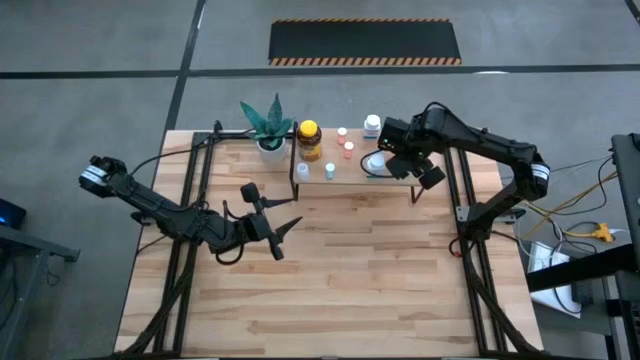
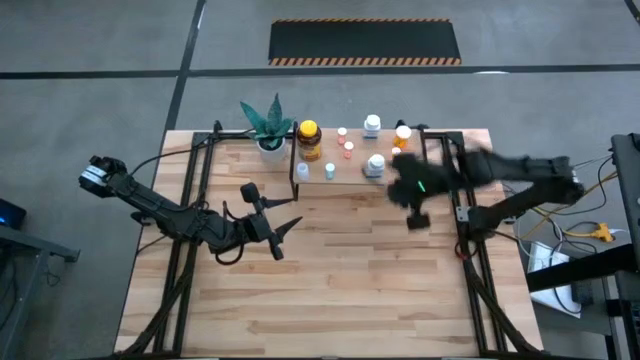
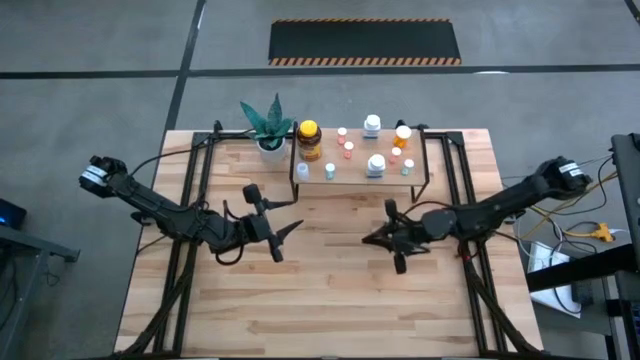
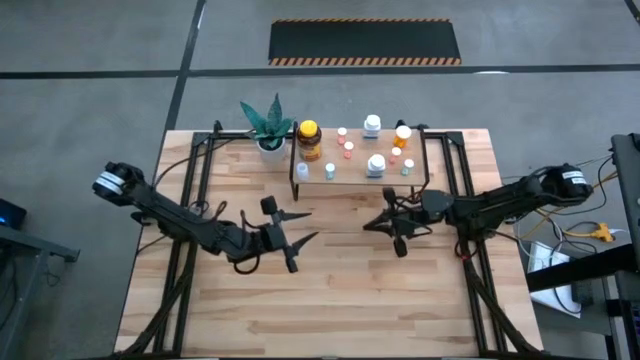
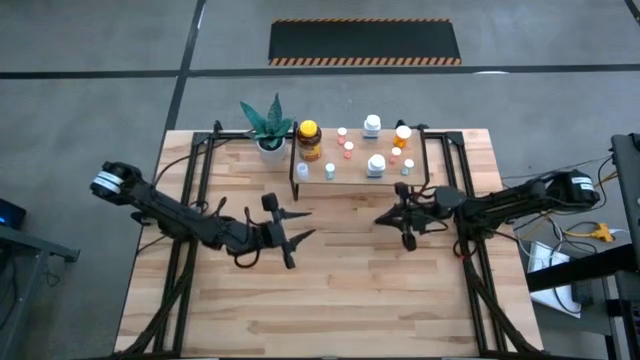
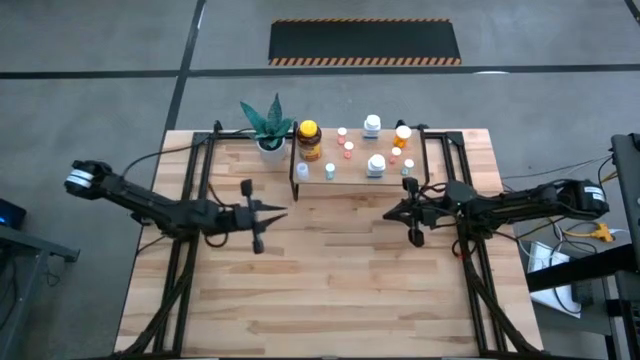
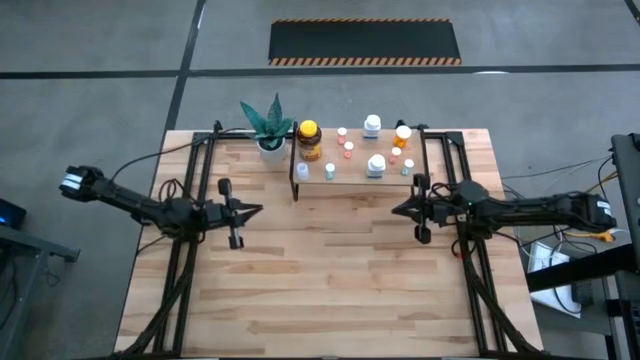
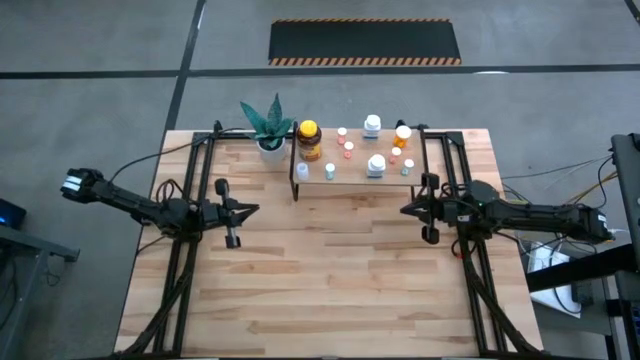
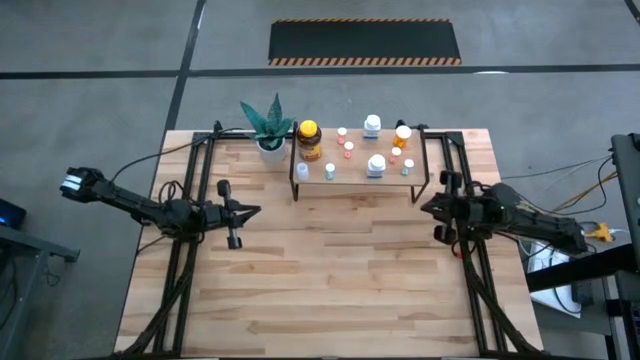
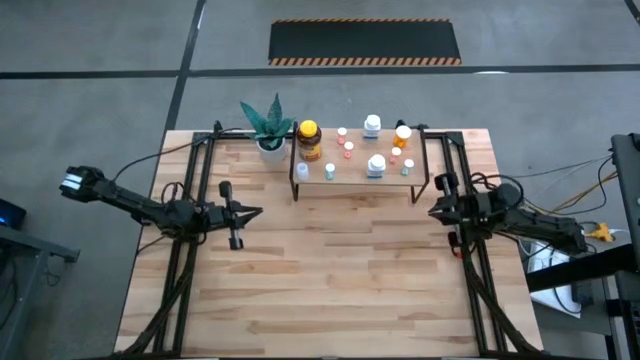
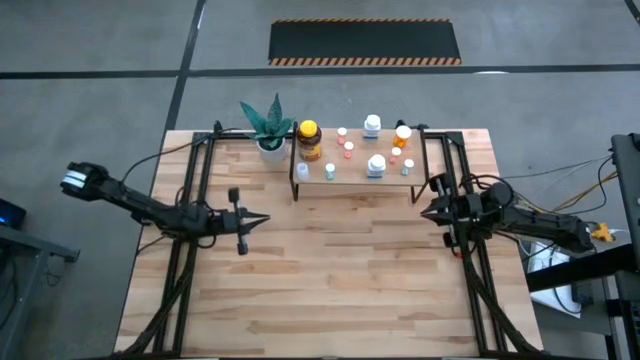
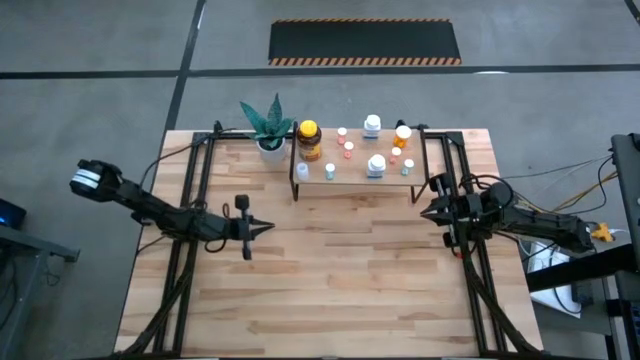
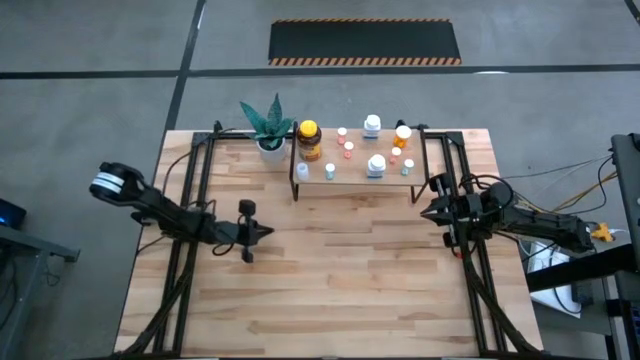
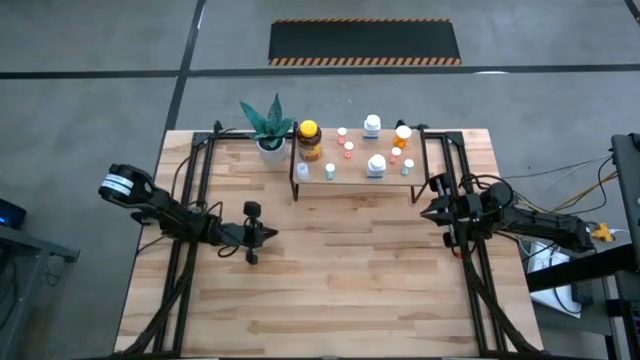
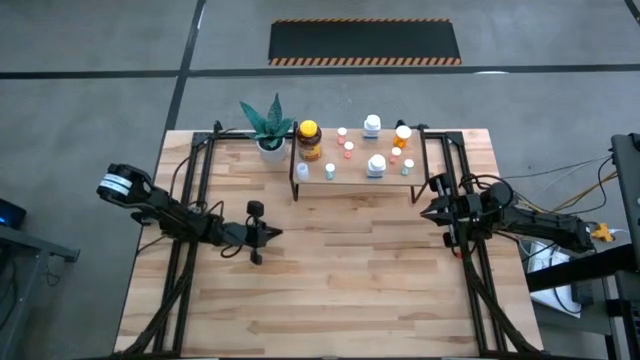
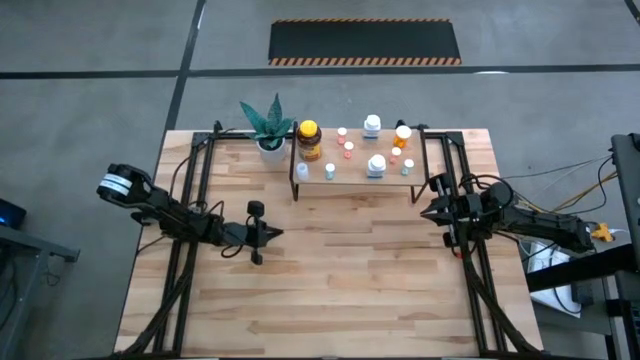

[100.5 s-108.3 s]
Task: Pick and place medicine bottles onto shelf by color
Return to Home Position

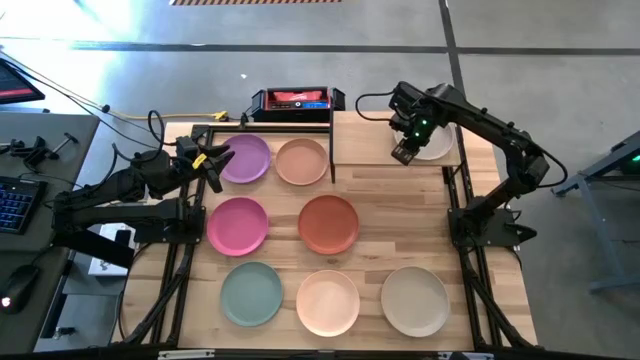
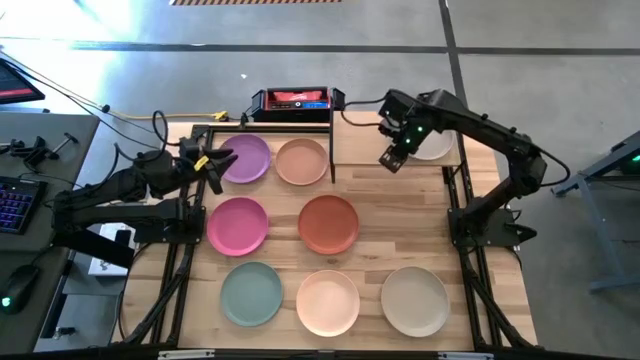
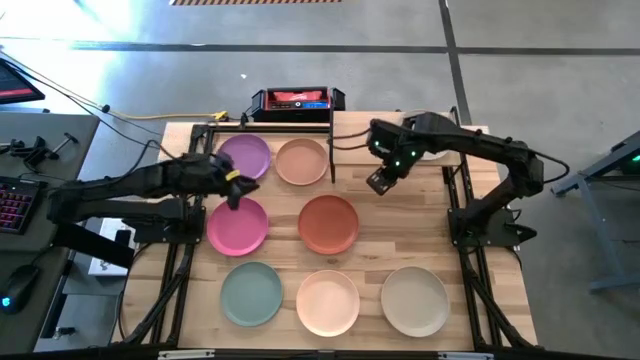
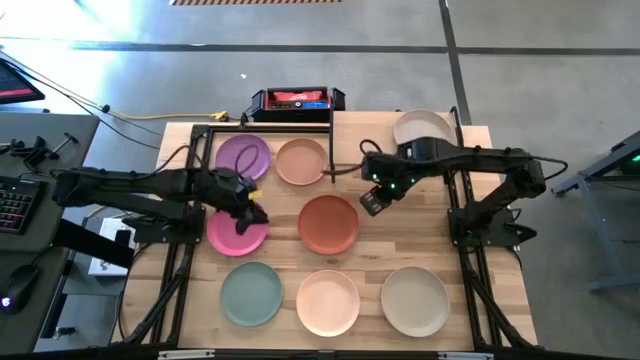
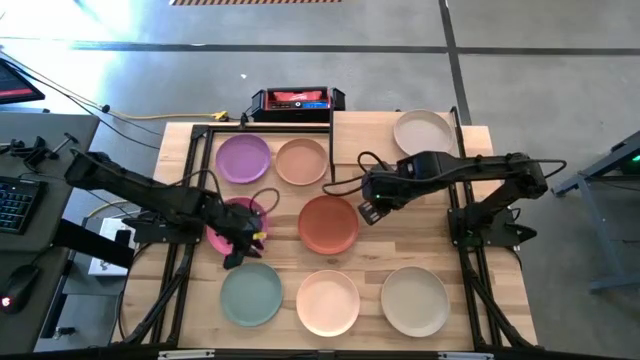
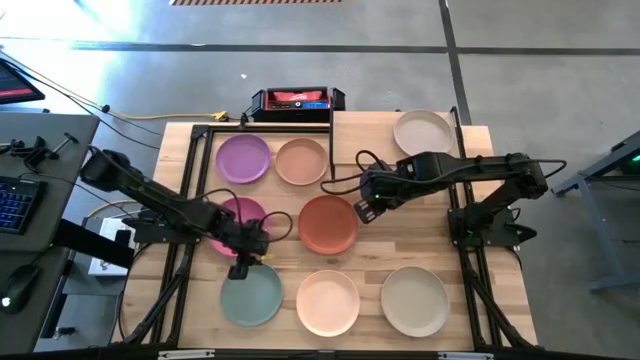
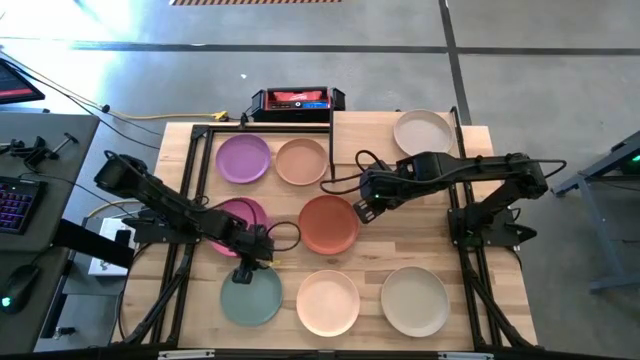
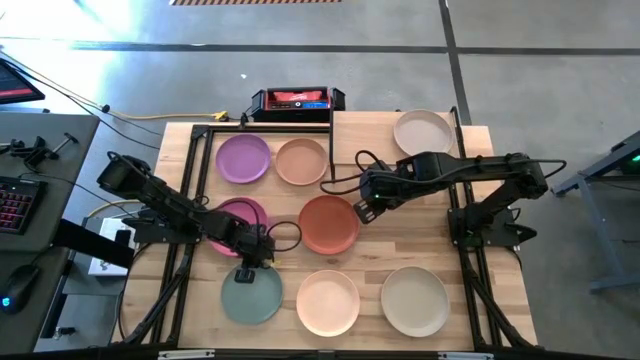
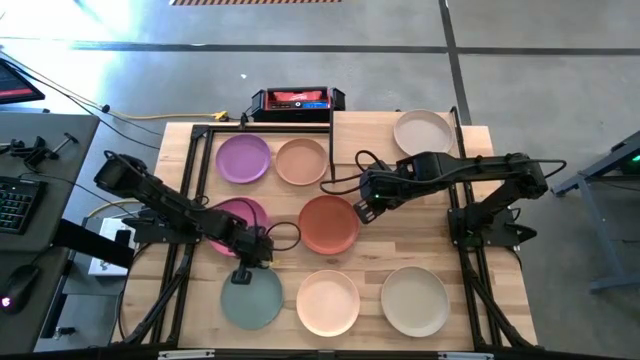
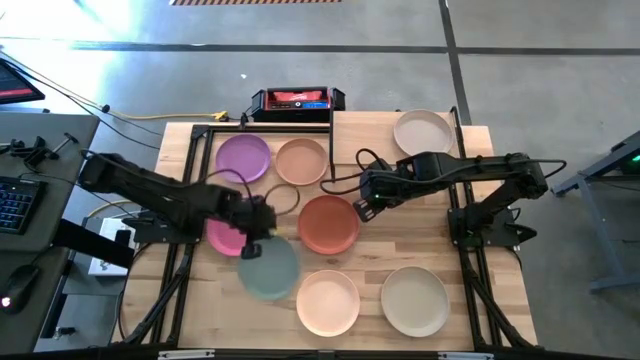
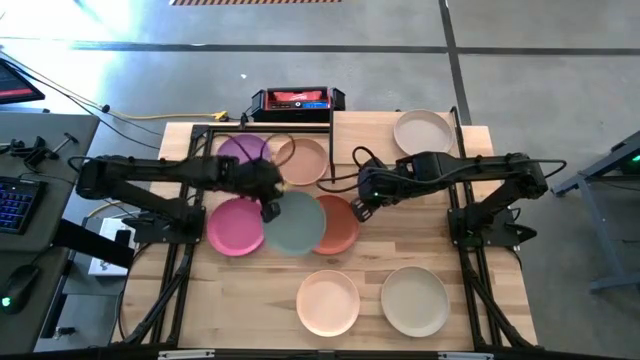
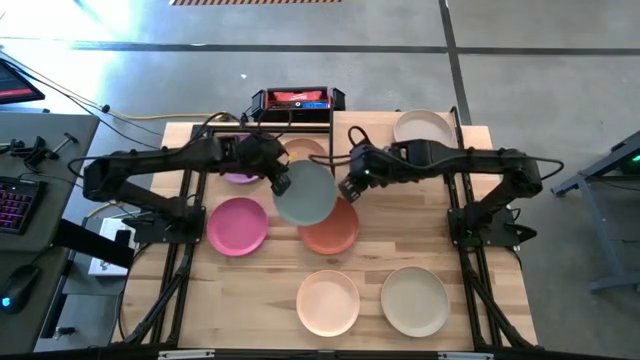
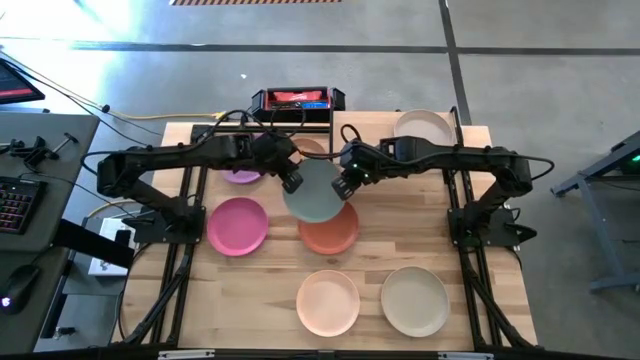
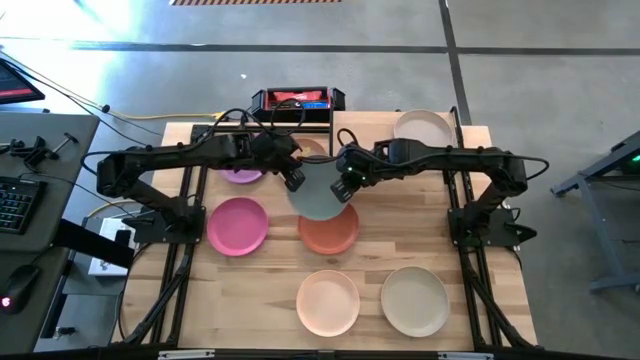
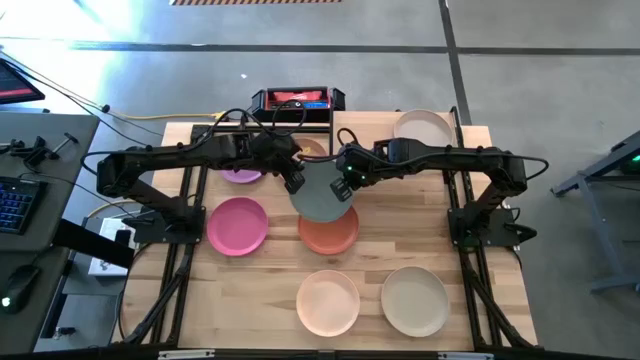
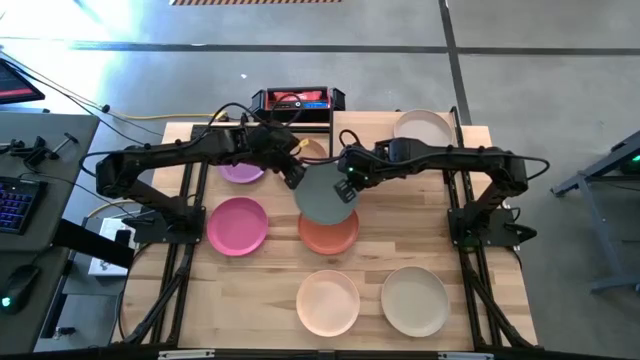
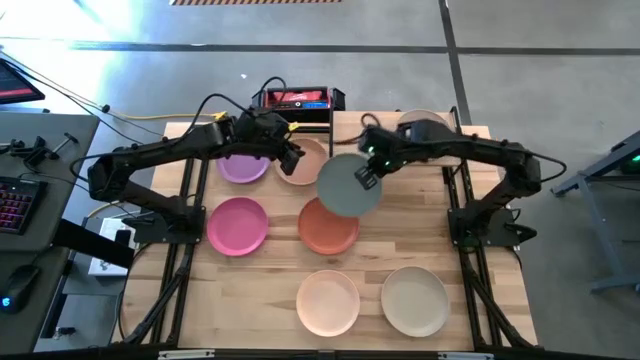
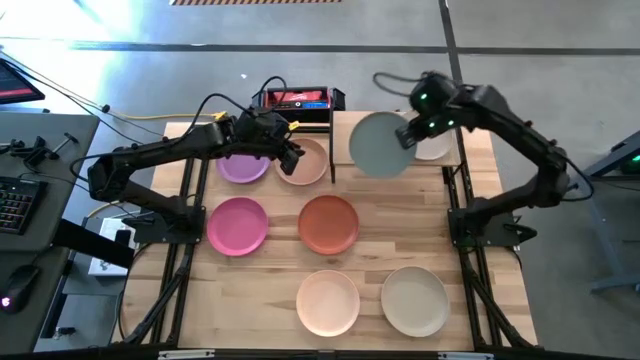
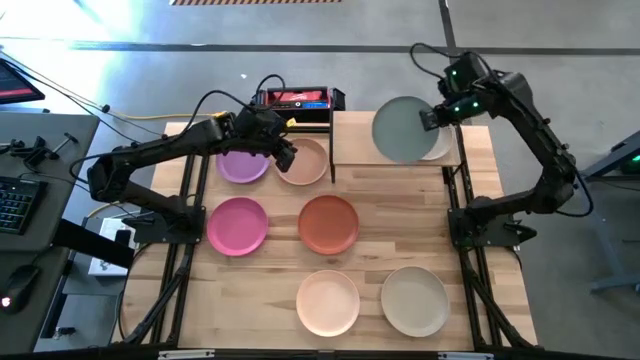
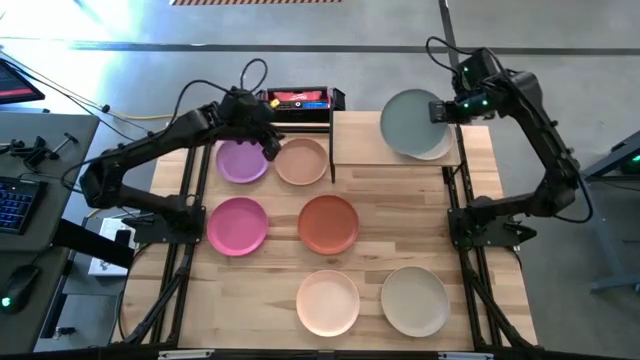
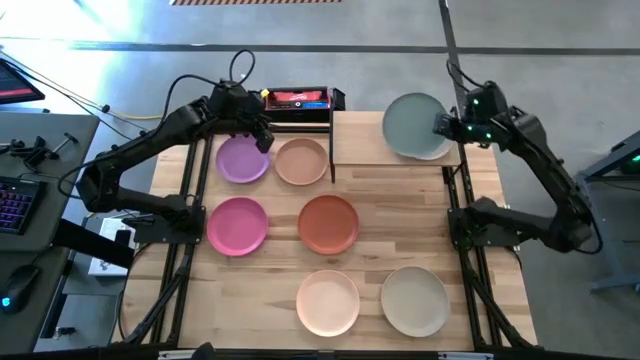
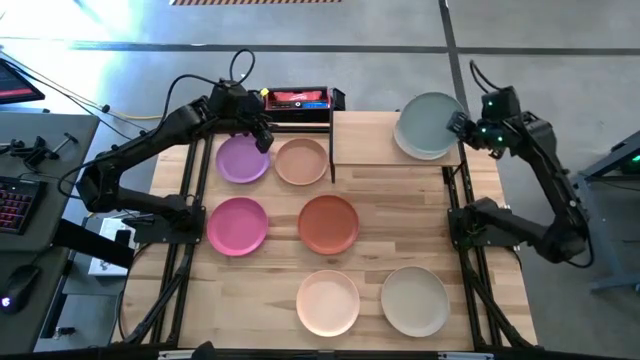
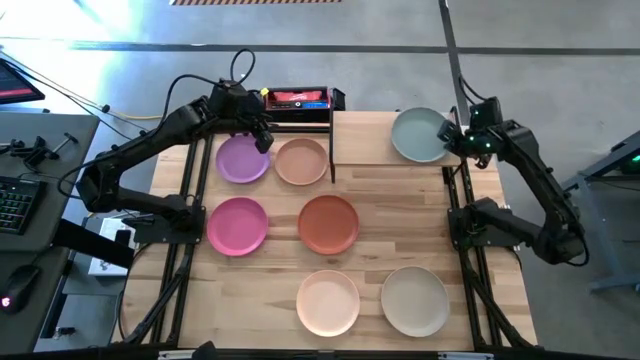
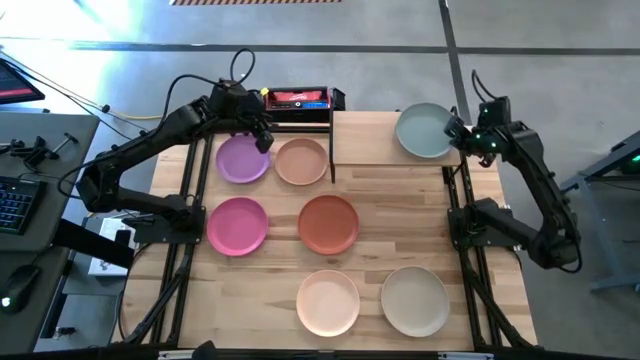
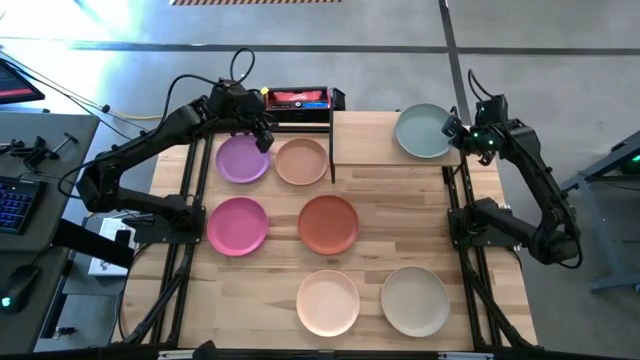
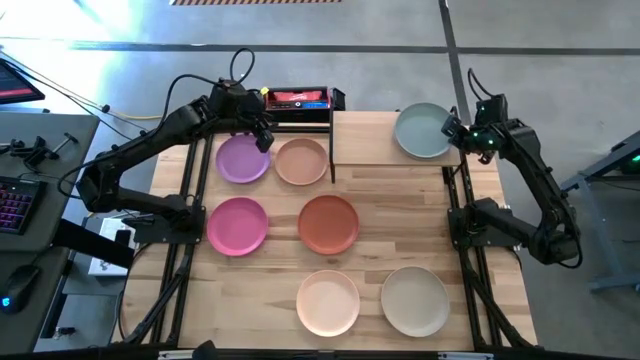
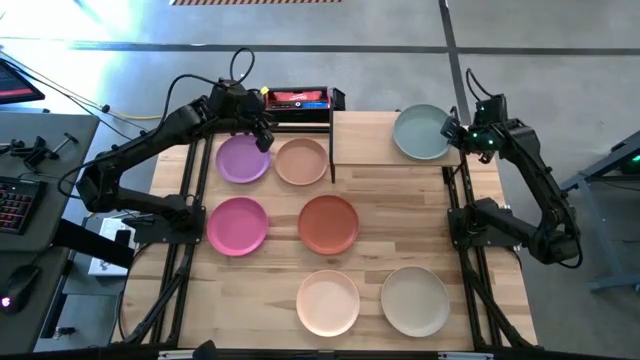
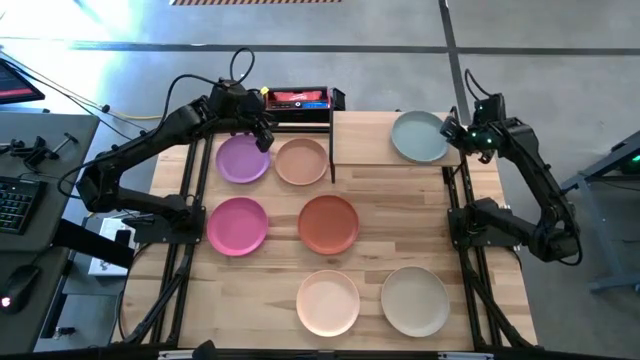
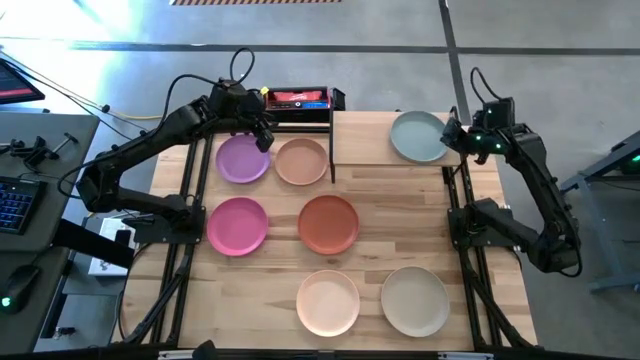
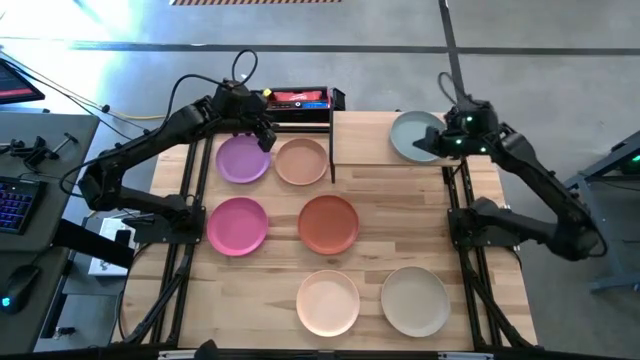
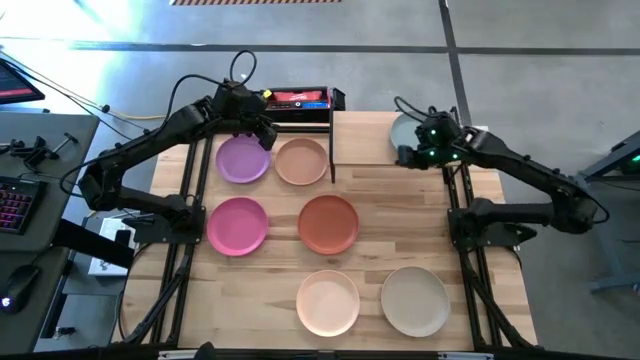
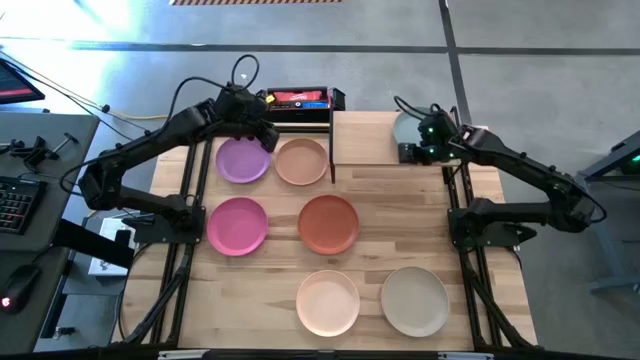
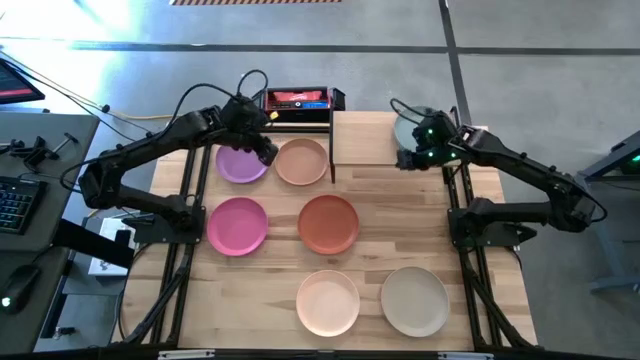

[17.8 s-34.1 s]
Task: Place and stack plates onto a shelf
Stack the light blue plate on top of the gray plate on the shelf
